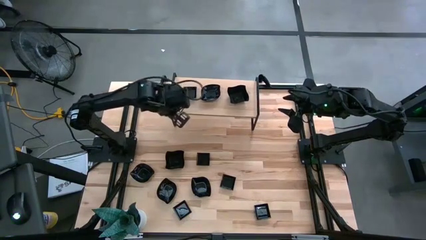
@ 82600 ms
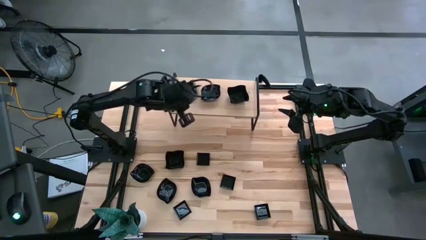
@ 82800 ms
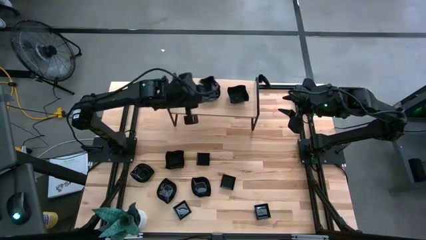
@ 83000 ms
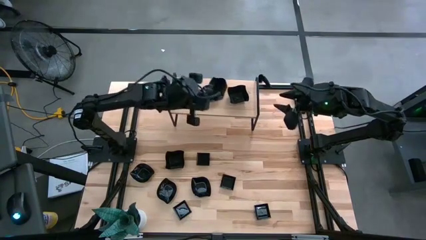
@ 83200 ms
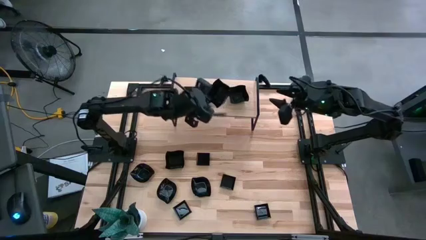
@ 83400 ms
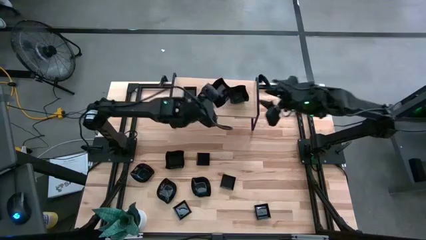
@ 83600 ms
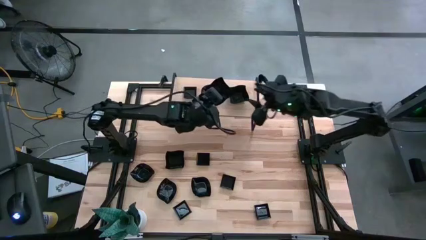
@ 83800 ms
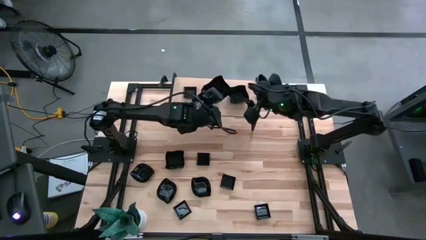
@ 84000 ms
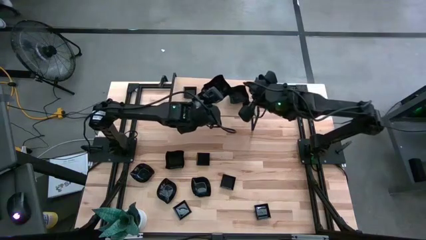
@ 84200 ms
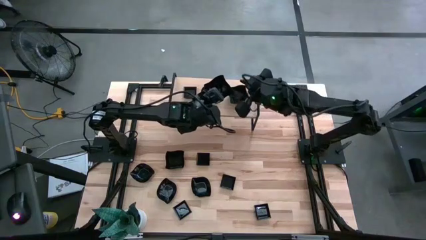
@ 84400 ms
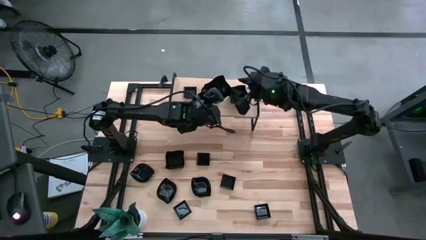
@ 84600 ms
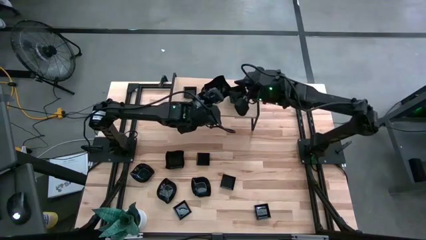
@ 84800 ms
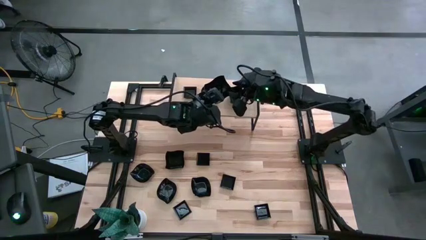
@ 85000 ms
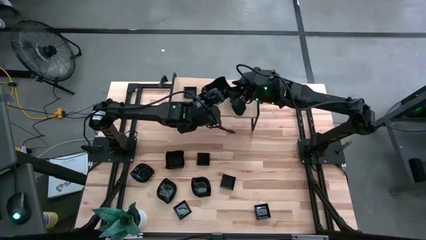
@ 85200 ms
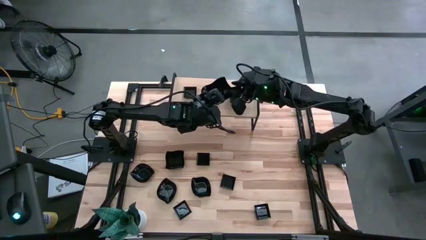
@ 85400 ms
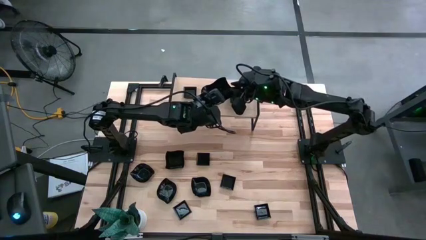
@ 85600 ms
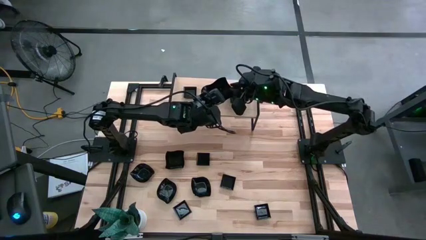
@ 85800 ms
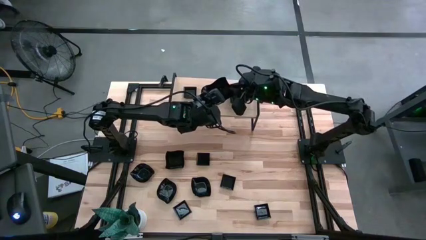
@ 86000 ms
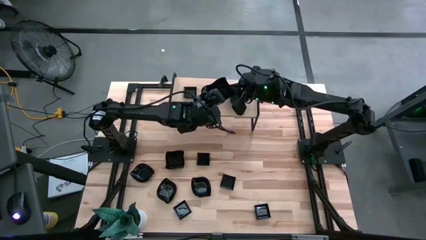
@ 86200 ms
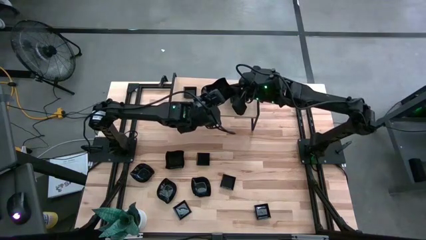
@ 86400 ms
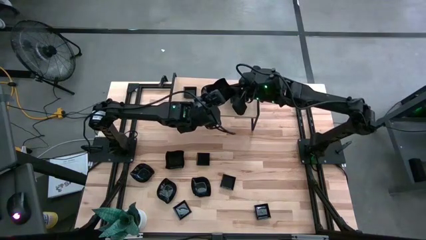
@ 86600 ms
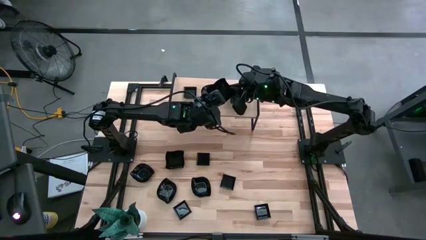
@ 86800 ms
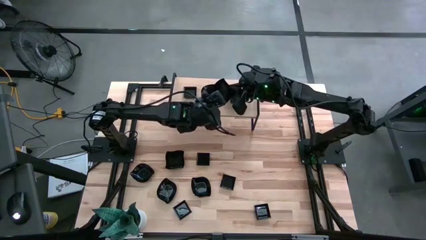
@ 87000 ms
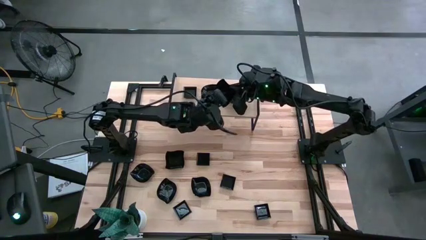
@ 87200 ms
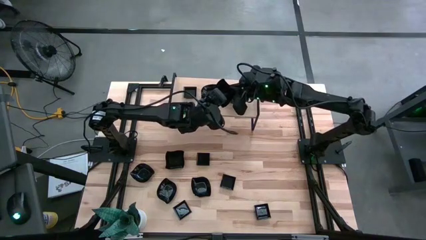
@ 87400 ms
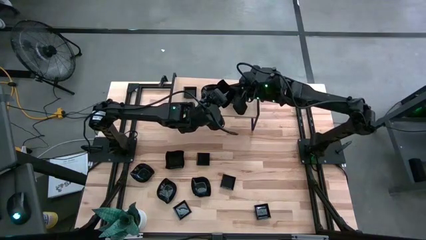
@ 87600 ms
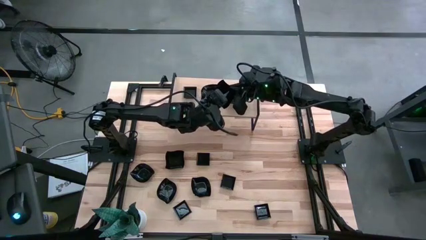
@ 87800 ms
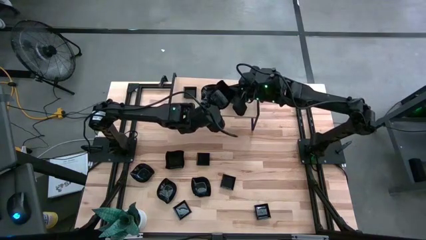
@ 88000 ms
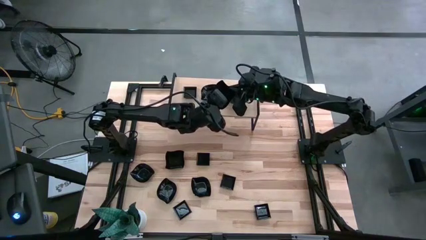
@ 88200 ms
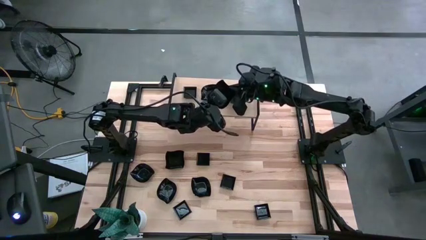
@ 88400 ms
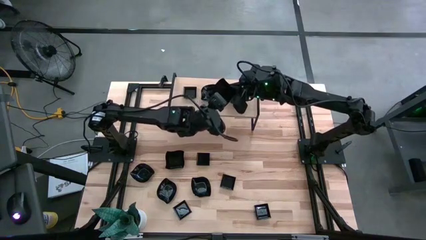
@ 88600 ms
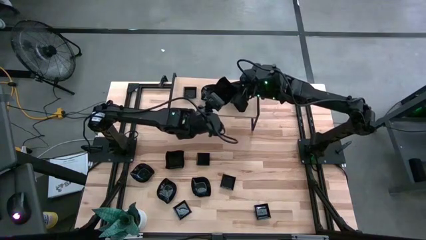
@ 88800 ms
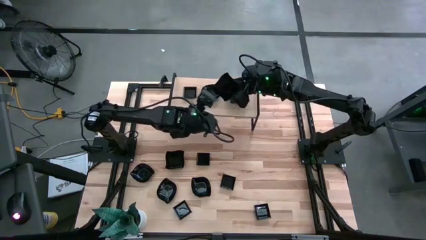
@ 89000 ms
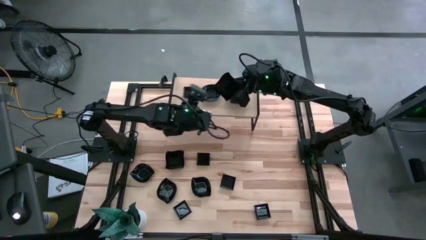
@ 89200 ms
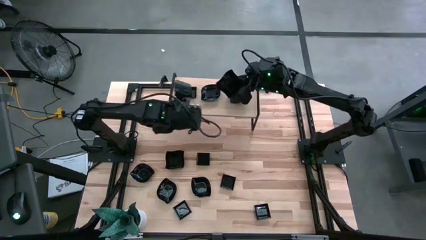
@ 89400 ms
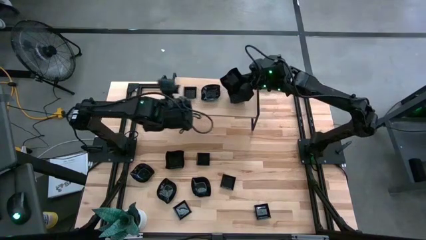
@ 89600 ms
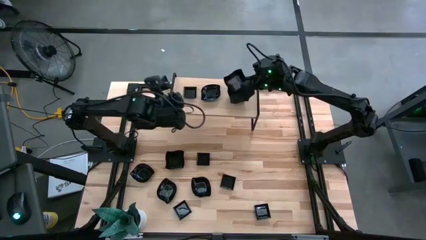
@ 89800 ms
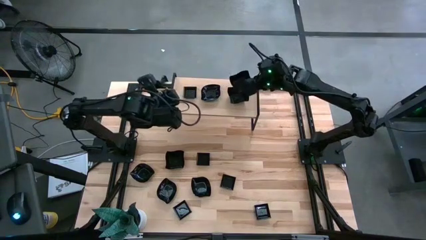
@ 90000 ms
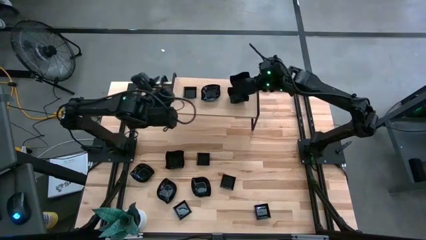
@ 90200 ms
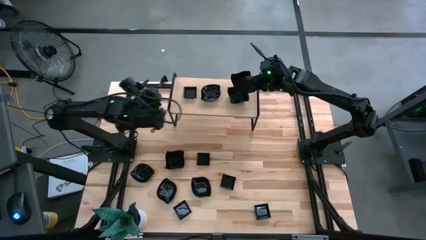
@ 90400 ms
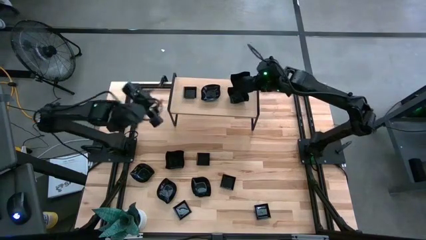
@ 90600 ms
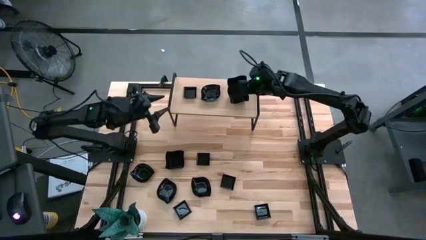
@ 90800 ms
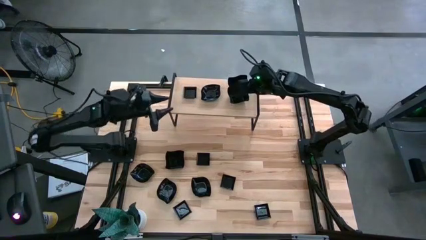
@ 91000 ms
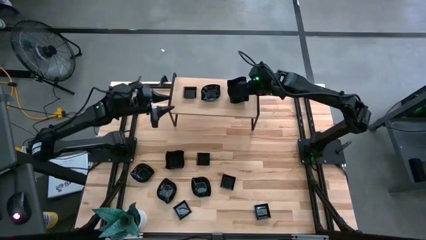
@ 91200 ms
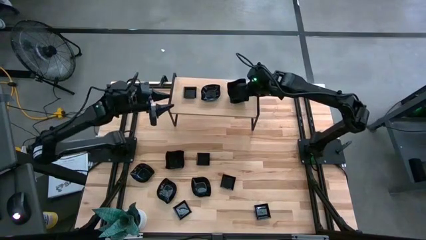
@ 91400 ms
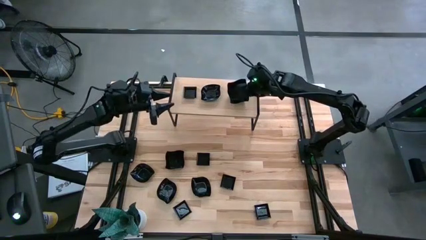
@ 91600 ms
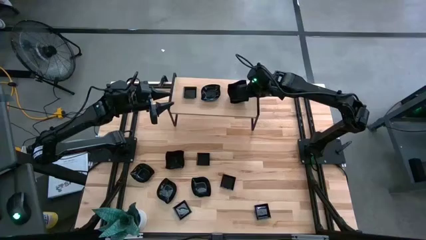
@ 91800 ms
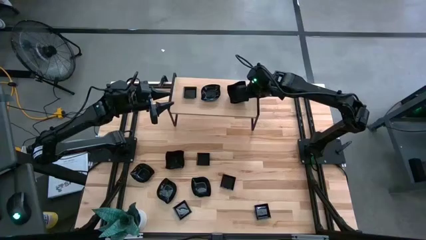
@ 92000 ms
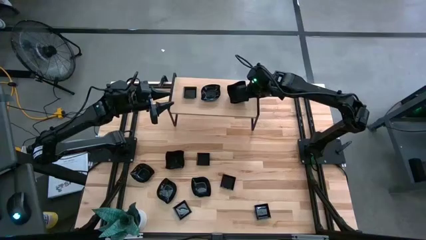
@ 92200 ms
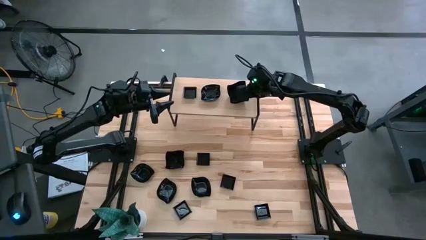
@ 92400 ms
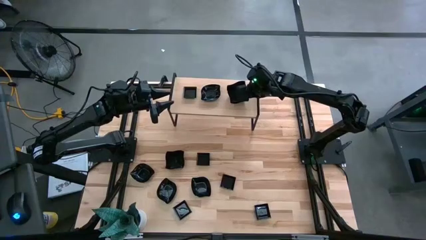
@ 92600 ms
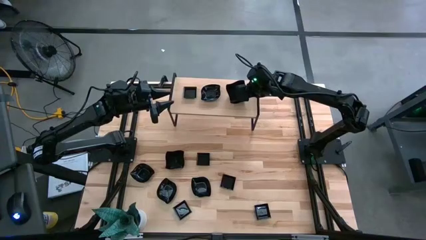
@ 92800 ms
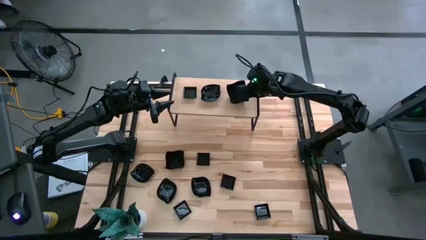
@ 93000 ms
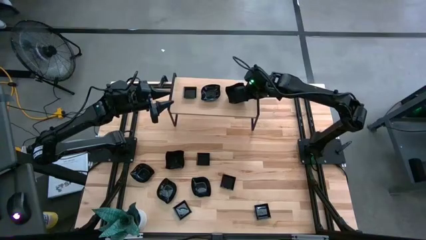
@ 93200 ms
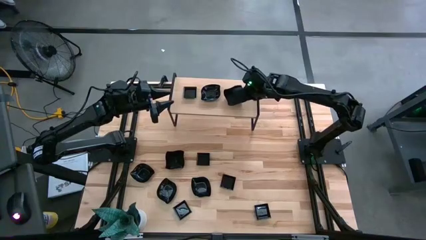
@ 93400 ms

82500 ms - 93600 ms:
Task: Pick & Place Mini shaped plates
Stack the square-shaped plate on the square-shaped plate
